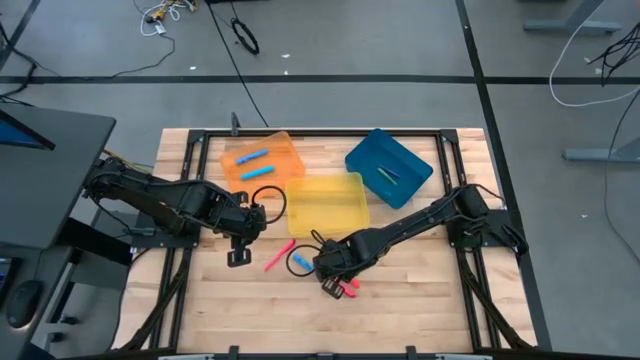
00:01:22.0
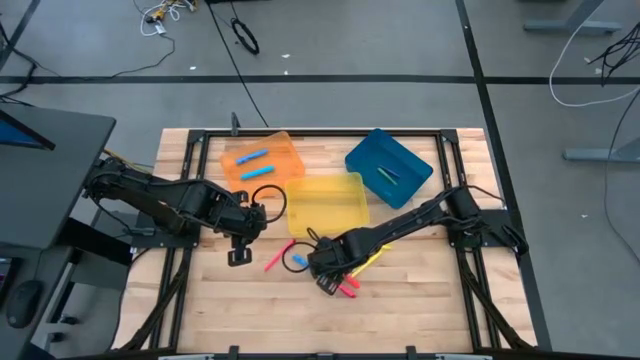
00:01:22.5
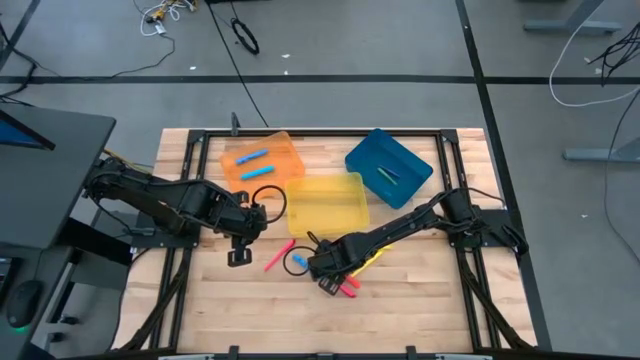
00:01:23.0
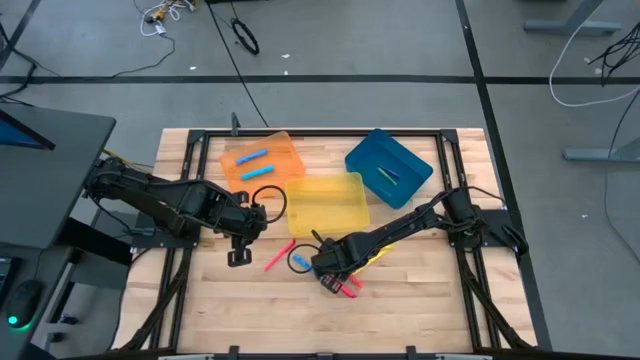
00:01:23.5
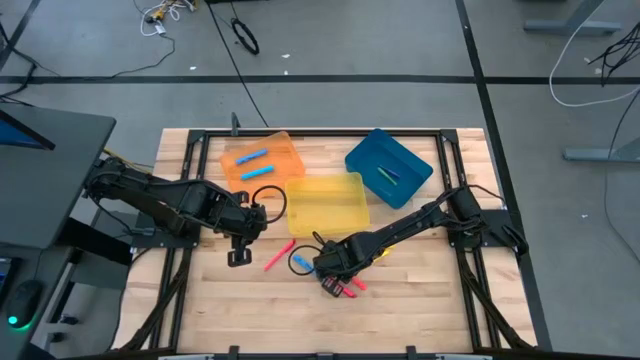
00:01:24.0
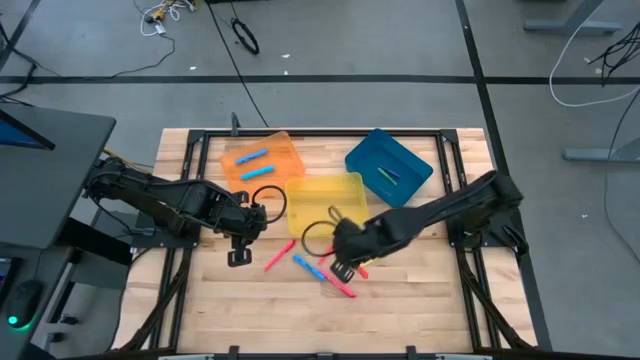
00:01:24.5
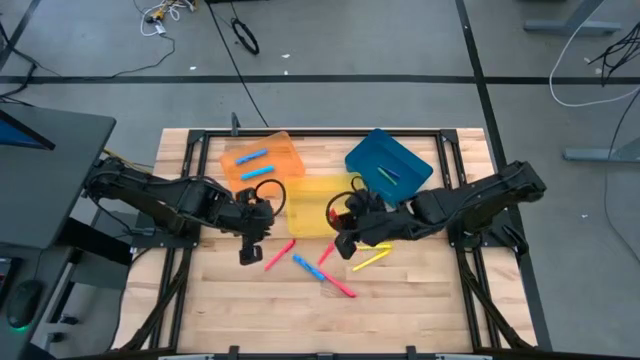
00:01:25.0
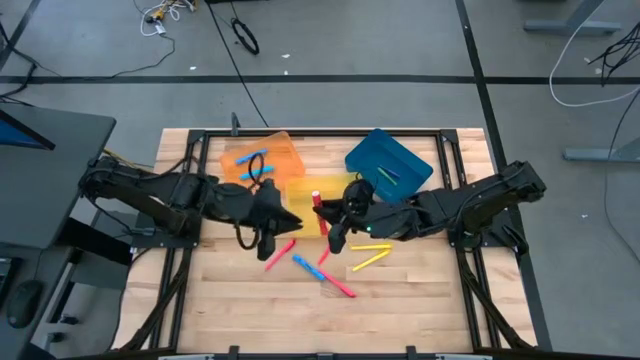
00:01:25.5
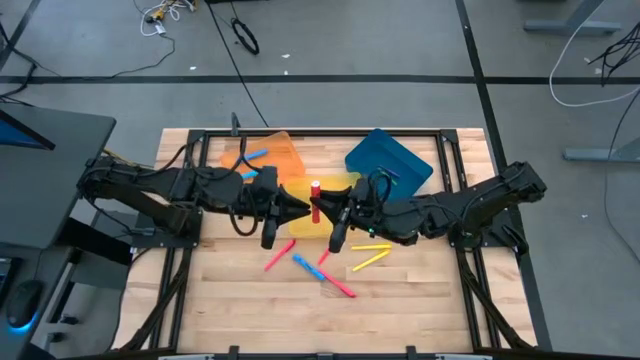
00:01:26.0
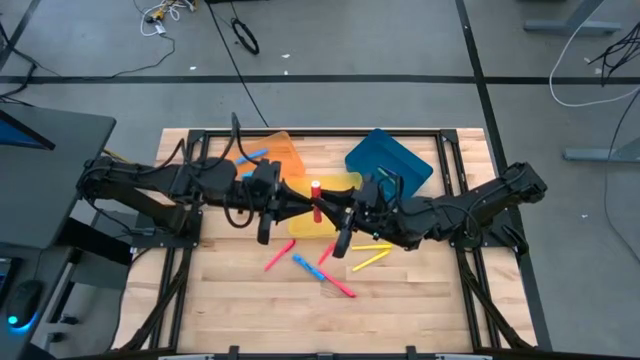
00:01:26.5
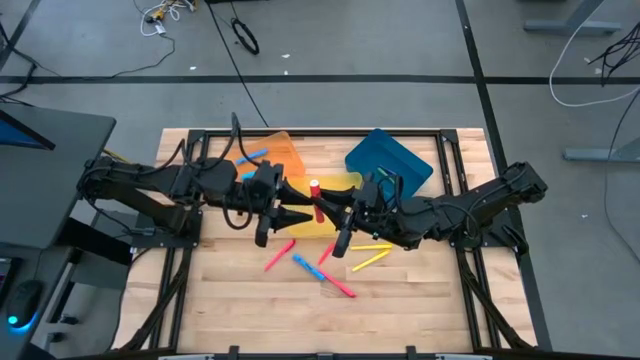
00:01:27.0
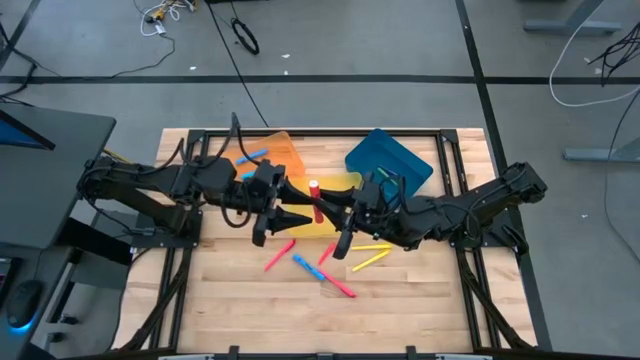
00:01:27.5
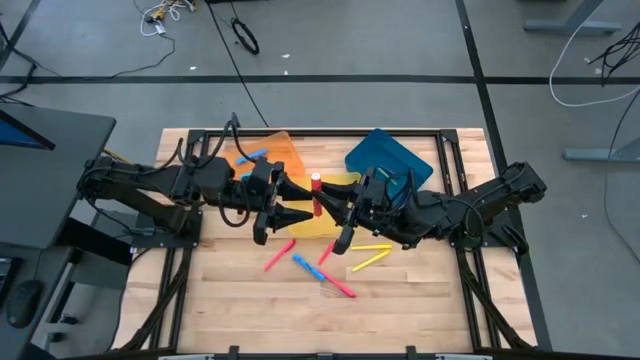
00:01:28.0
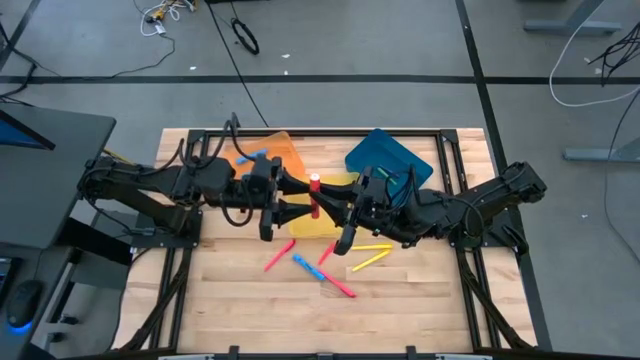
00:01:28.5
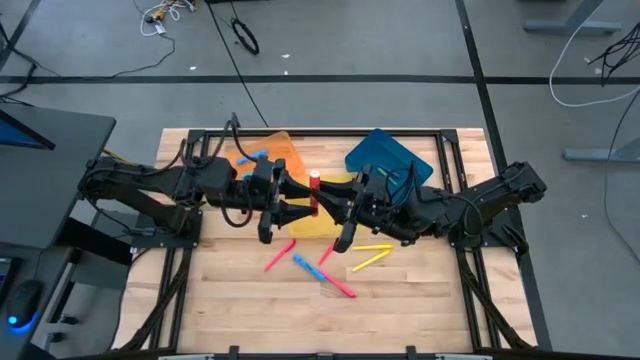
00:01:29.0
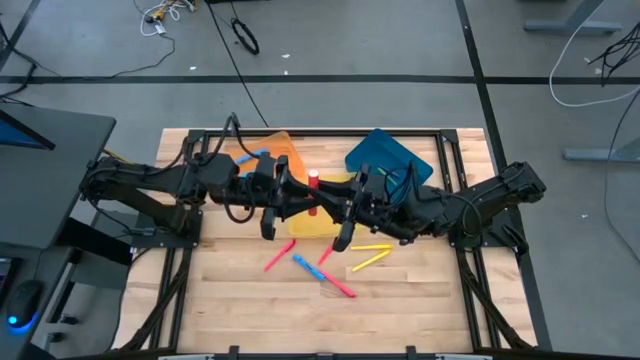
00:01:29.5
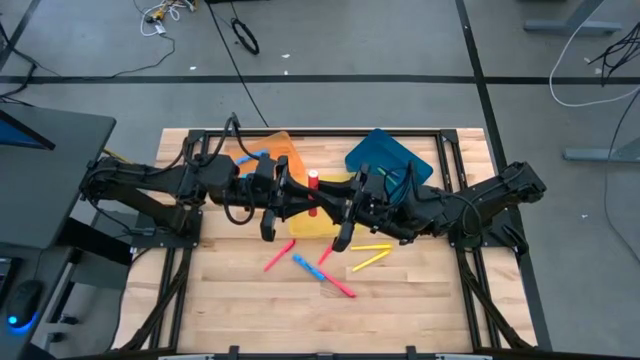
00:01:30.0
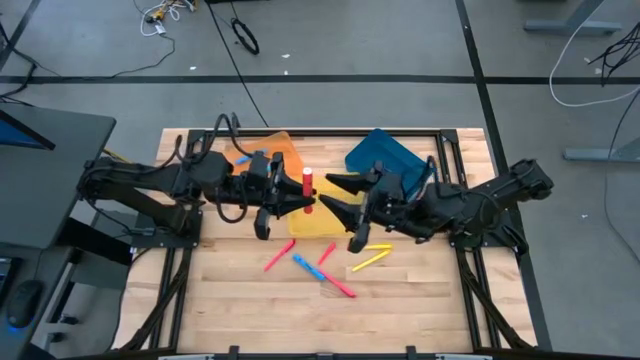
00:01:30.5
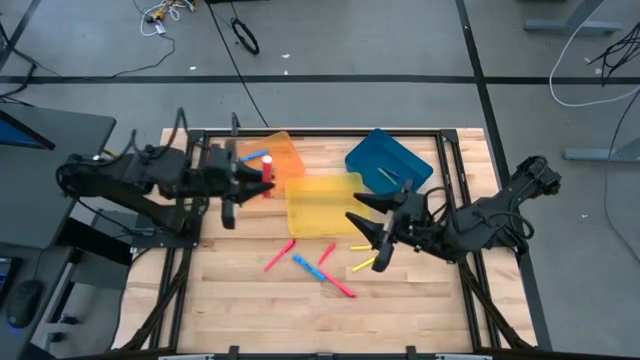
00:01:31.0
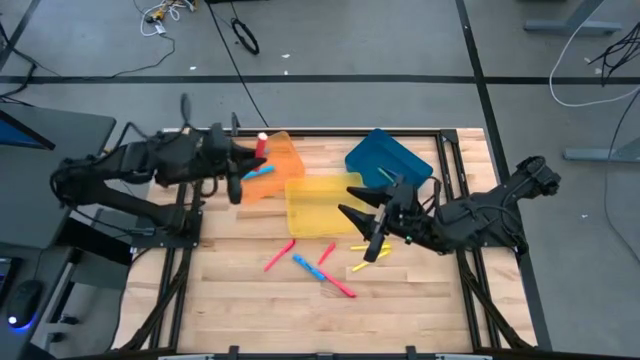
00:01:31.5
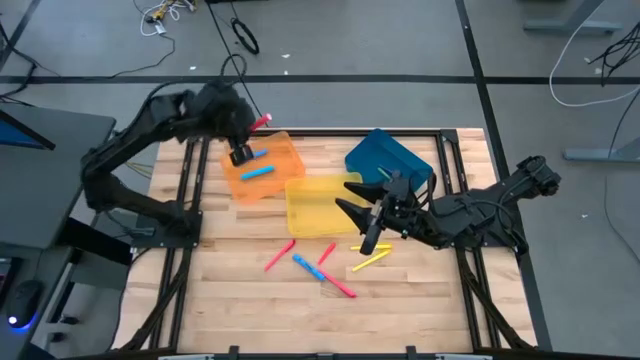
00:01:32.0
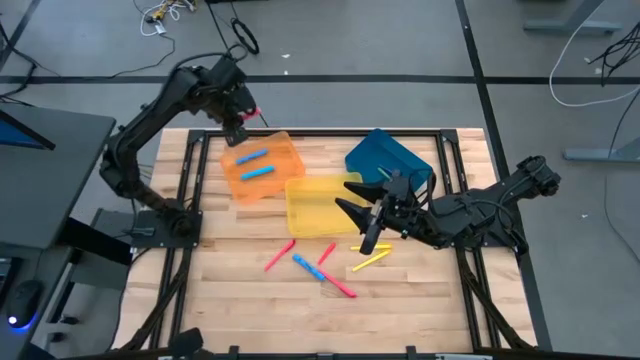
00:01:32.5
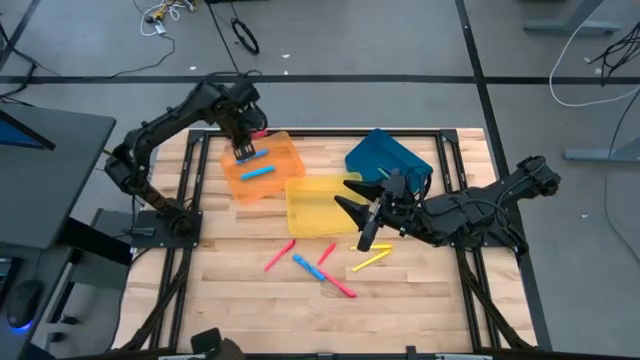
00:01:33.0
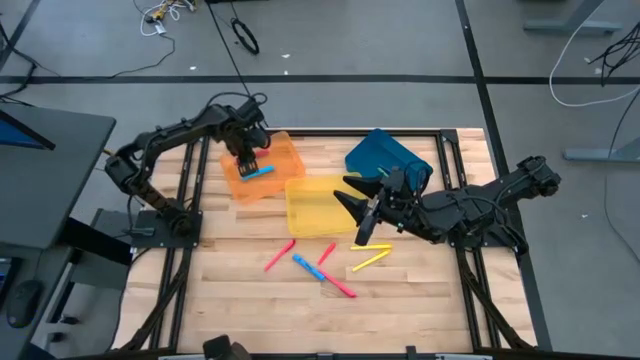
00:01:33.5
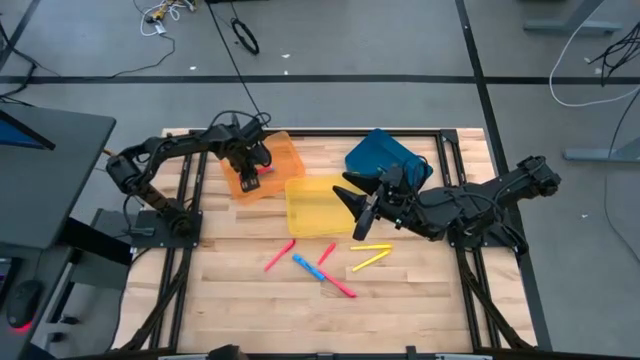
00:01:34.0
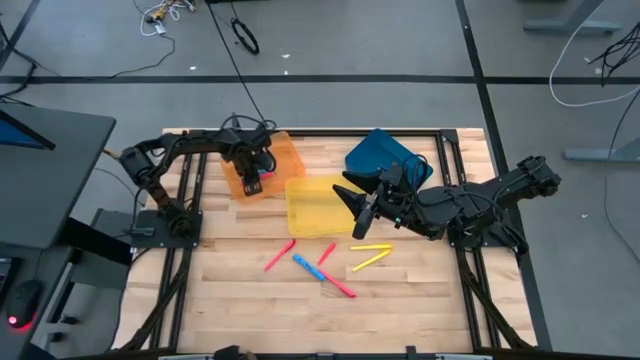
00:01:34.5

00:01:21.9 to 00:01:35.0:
Task: Pick & Place Markers
Put the orange highlighter pen into the orange bin

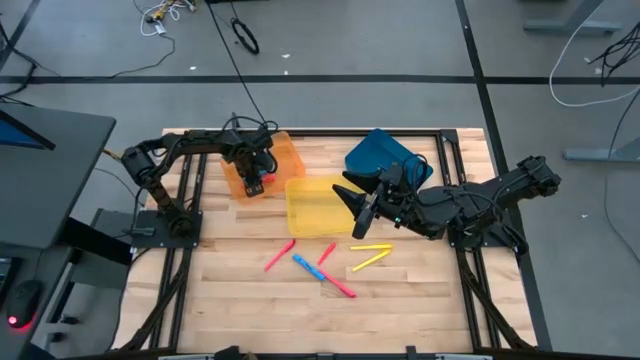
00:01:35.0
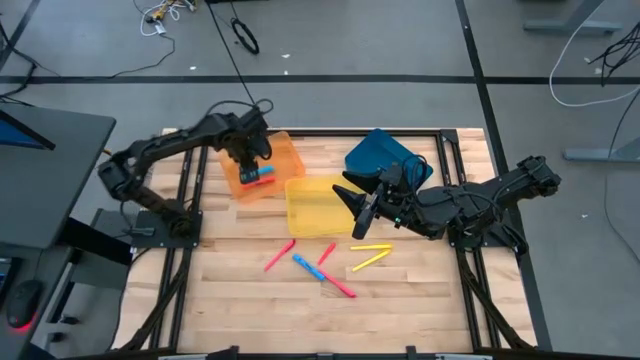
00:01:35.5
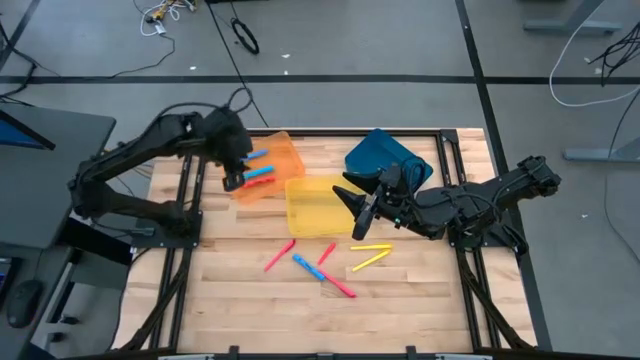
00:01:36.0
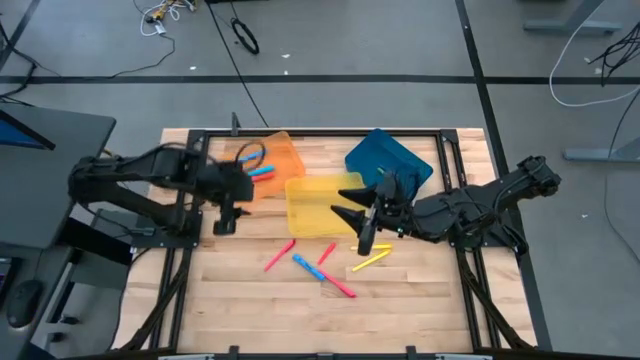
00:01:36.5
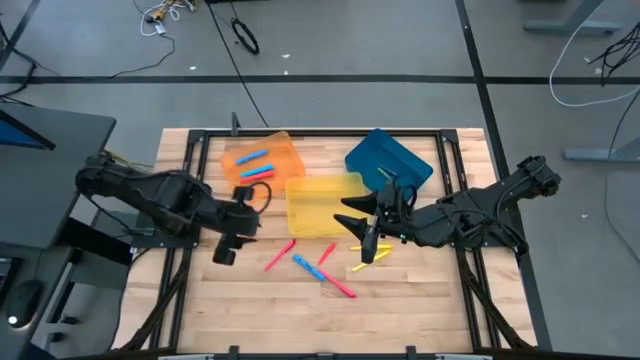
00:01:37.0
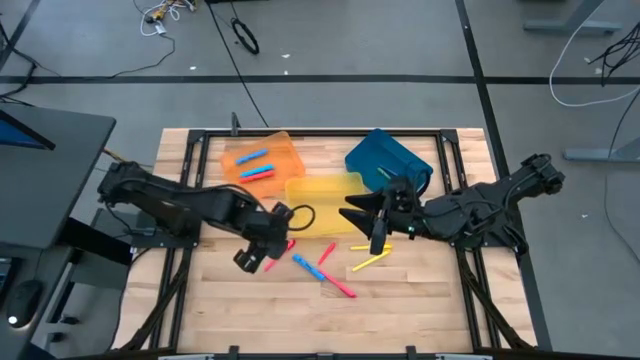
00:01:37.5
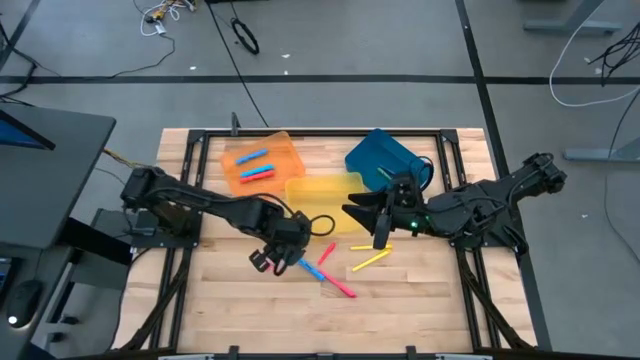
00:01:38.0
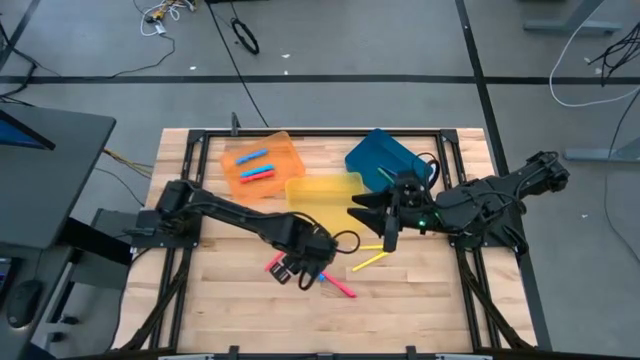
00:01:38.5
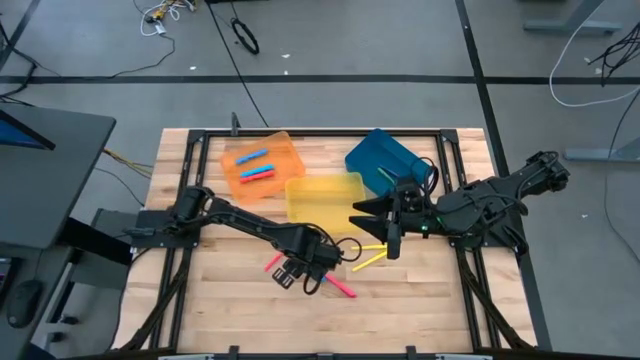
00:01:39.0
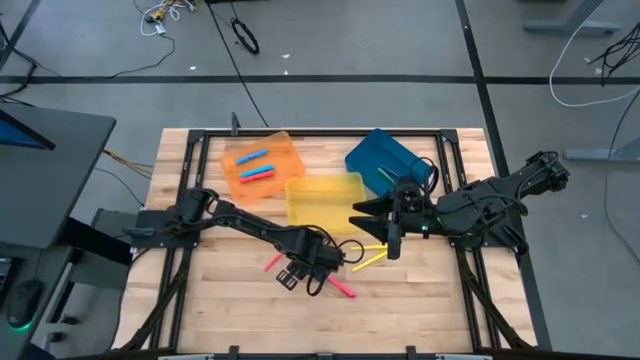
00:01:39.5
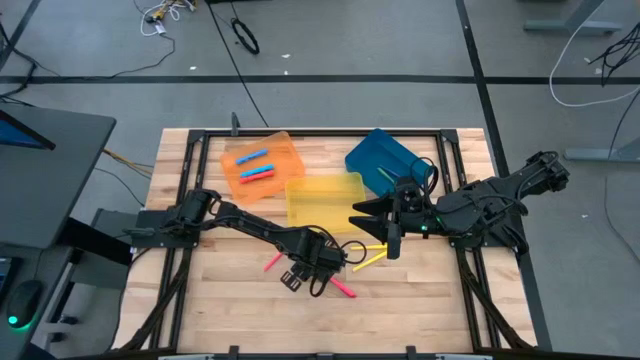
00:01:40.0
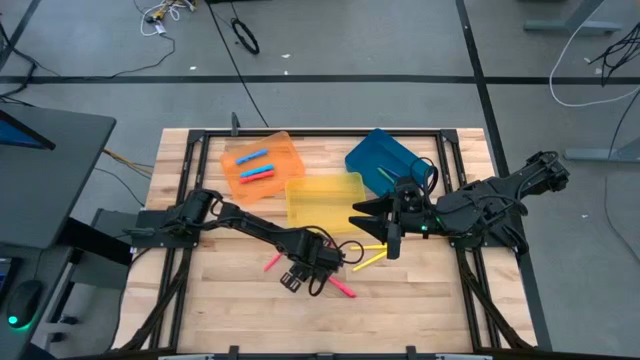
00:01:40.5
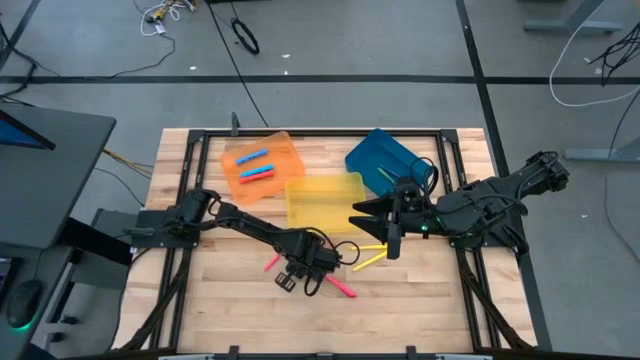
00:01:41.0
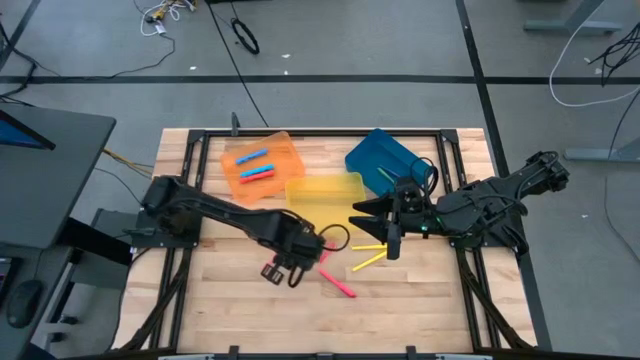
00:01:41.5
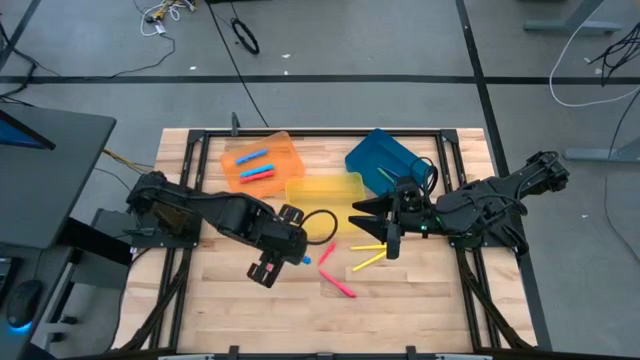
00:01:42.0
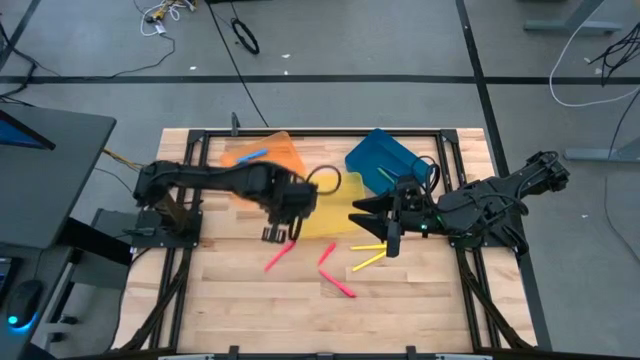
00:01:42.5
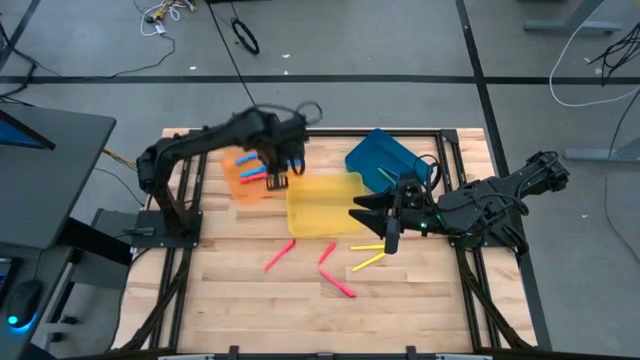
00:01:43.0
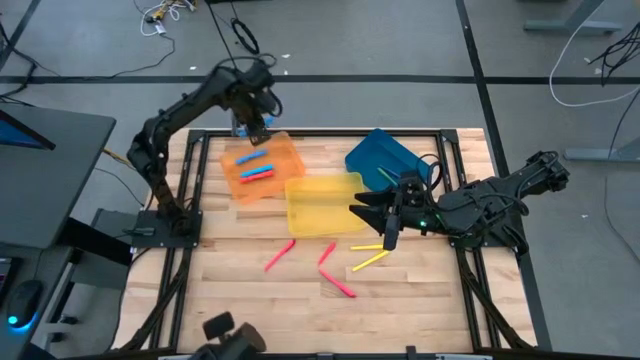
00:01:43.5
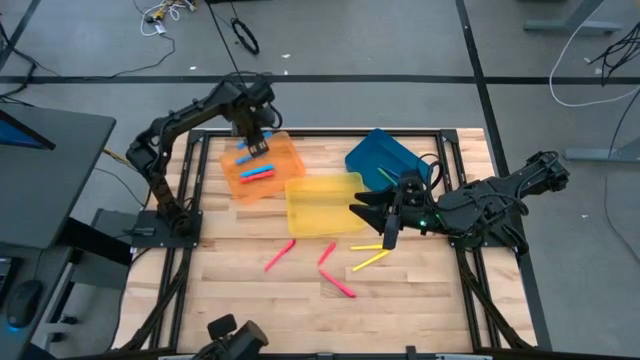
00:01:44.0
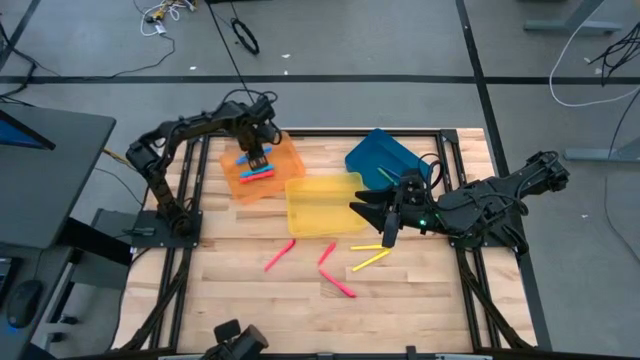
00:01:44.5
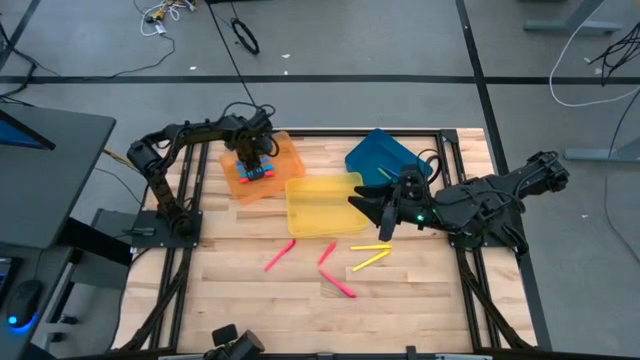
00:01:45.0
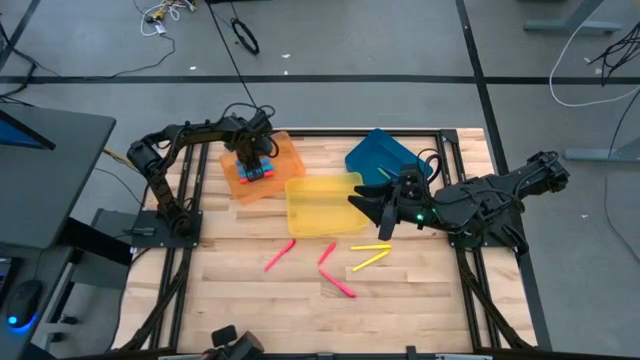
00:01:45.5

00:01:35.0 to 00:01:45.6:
Put the blue highlighter pen into the orange bin
